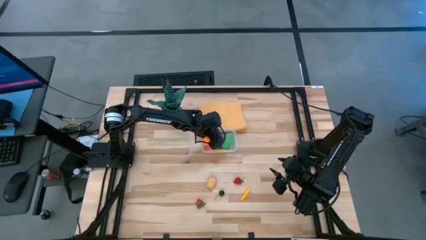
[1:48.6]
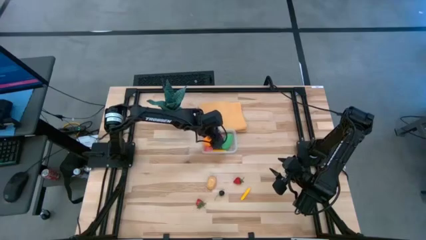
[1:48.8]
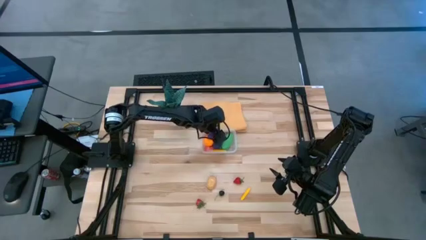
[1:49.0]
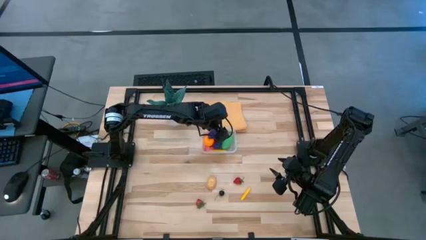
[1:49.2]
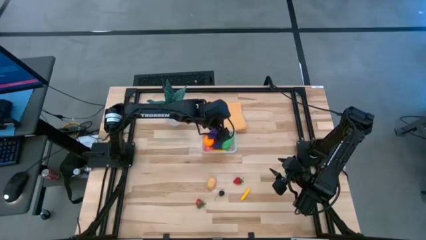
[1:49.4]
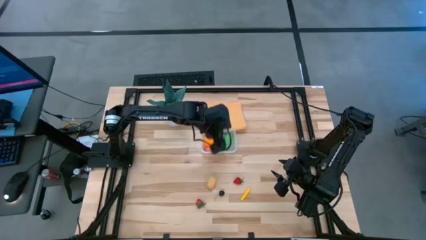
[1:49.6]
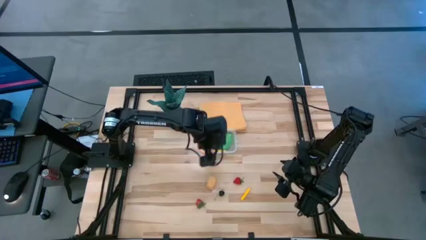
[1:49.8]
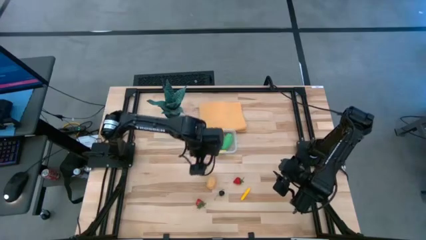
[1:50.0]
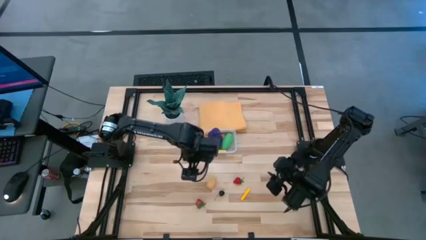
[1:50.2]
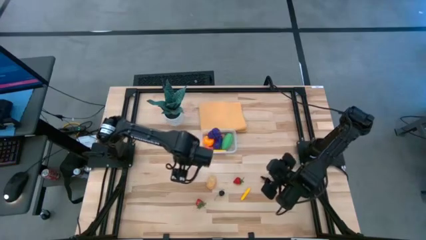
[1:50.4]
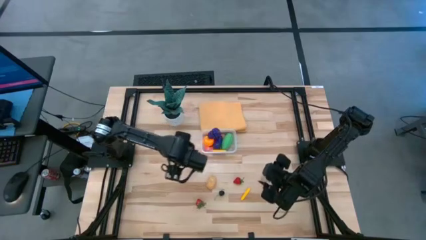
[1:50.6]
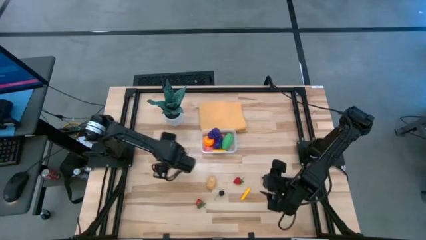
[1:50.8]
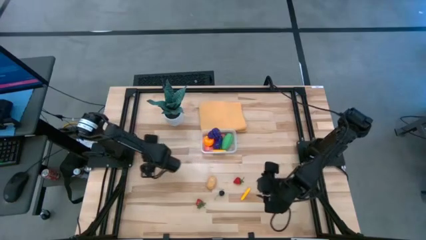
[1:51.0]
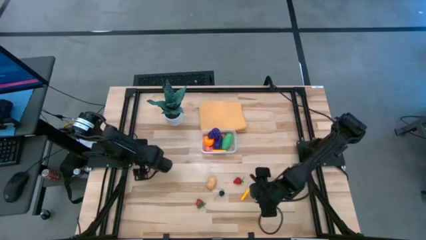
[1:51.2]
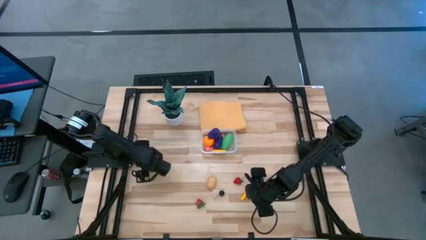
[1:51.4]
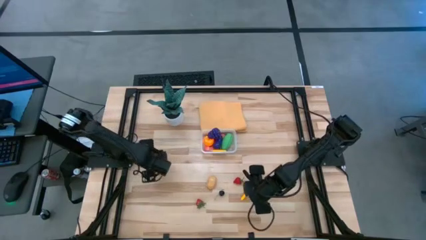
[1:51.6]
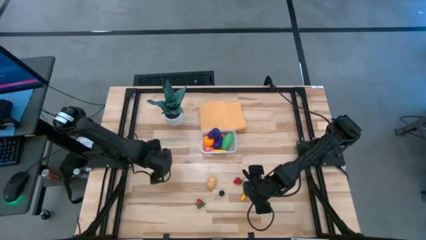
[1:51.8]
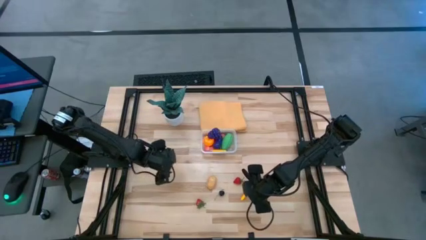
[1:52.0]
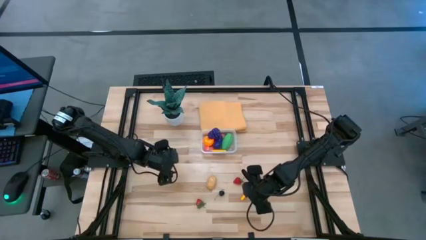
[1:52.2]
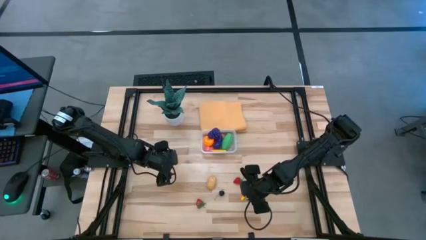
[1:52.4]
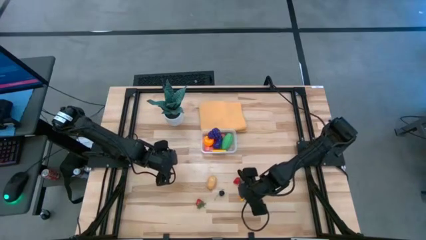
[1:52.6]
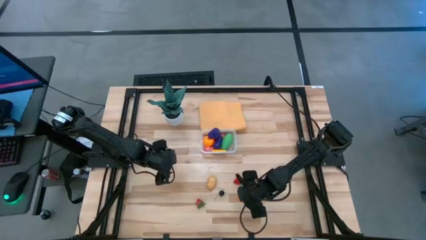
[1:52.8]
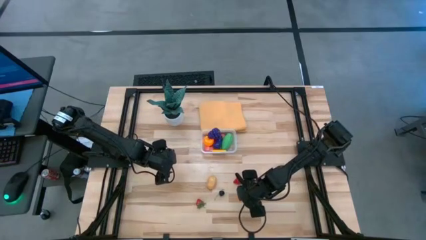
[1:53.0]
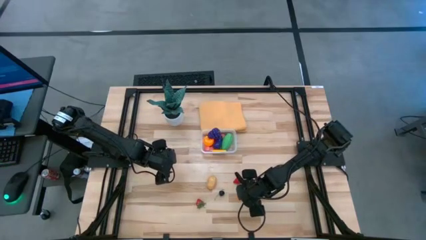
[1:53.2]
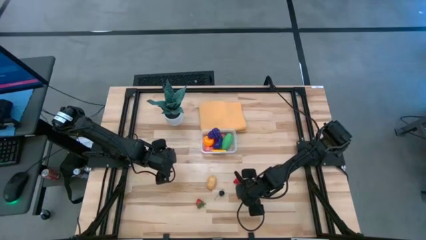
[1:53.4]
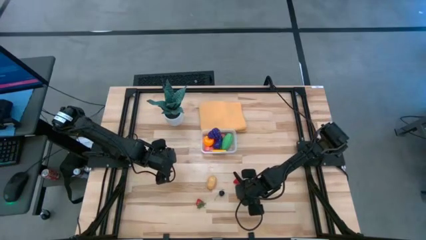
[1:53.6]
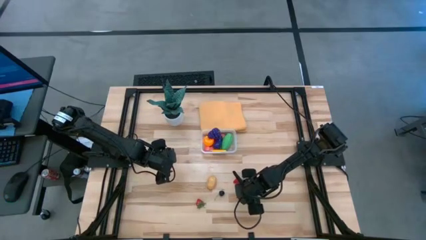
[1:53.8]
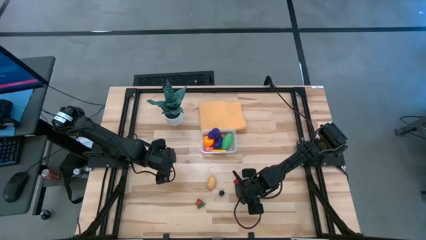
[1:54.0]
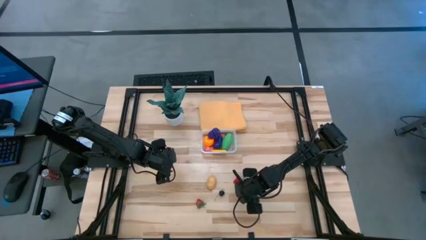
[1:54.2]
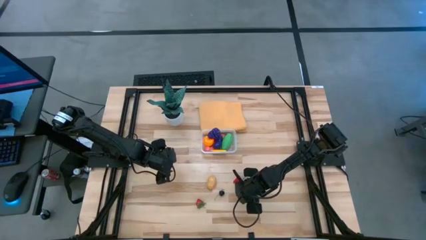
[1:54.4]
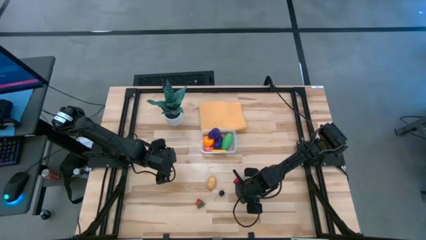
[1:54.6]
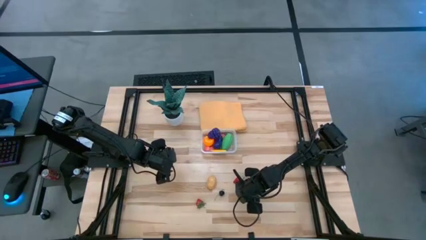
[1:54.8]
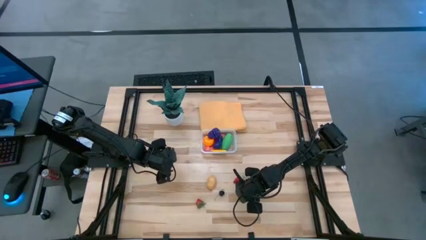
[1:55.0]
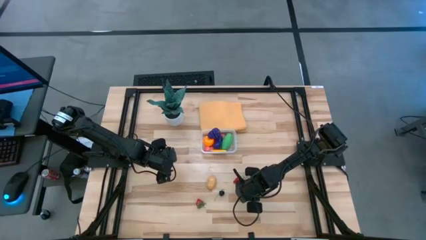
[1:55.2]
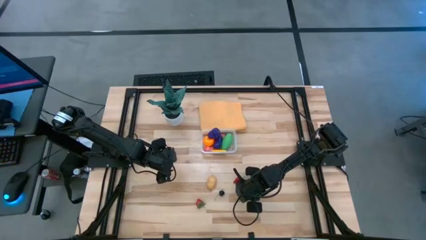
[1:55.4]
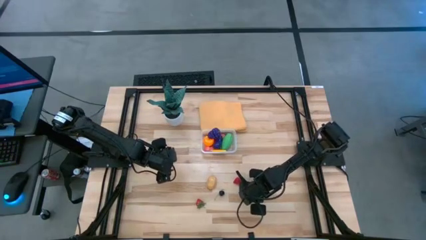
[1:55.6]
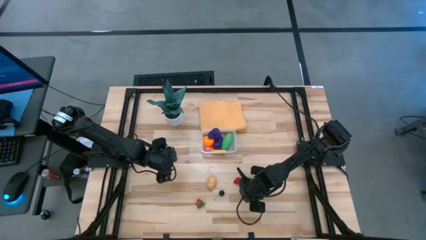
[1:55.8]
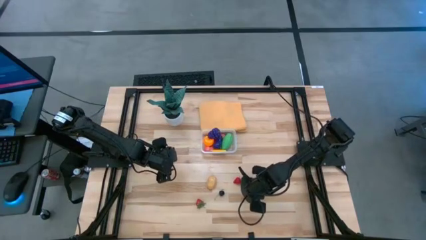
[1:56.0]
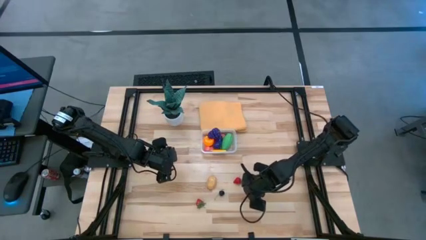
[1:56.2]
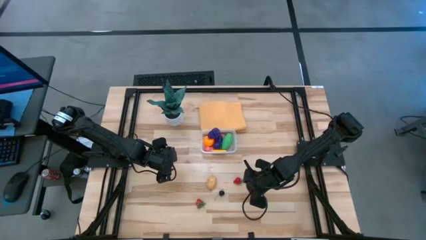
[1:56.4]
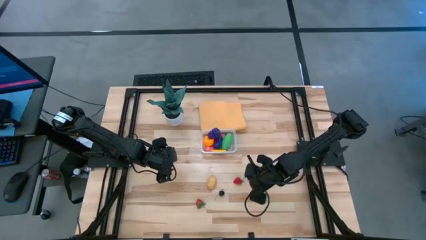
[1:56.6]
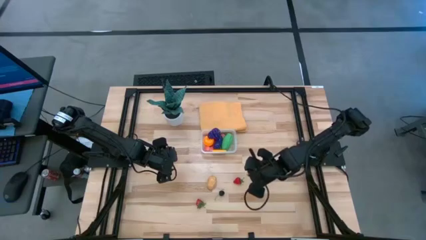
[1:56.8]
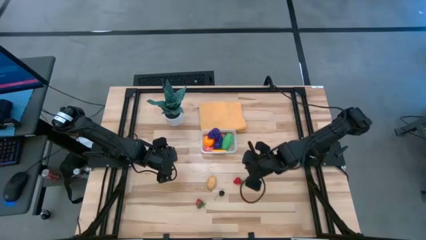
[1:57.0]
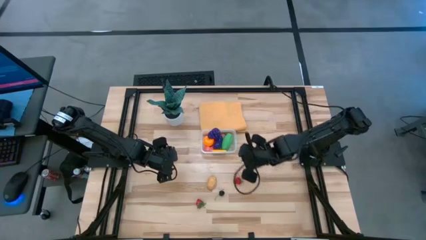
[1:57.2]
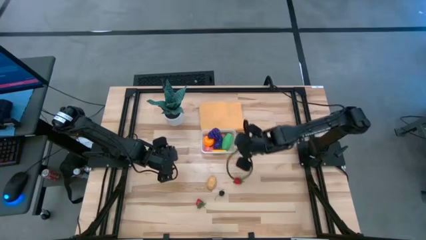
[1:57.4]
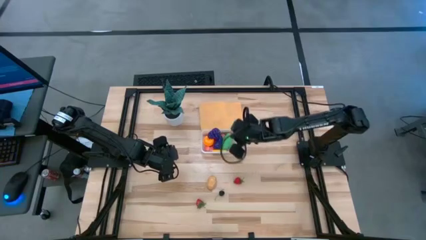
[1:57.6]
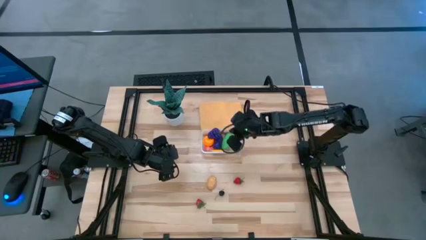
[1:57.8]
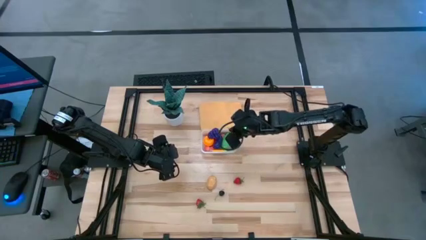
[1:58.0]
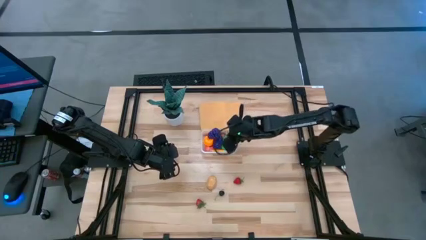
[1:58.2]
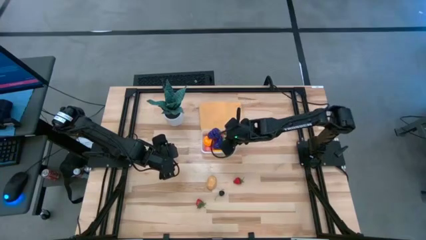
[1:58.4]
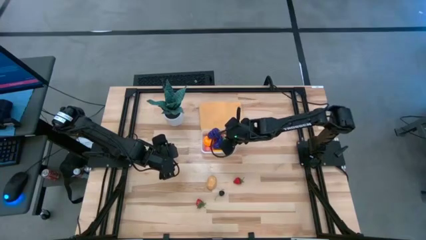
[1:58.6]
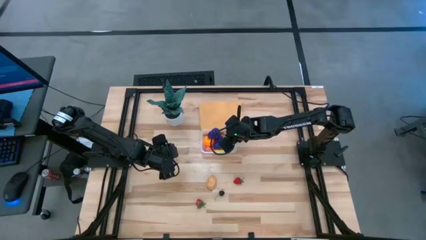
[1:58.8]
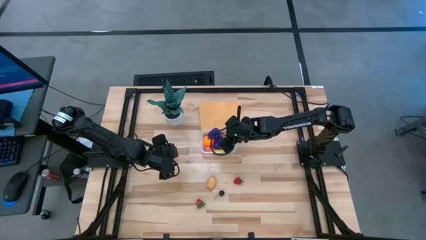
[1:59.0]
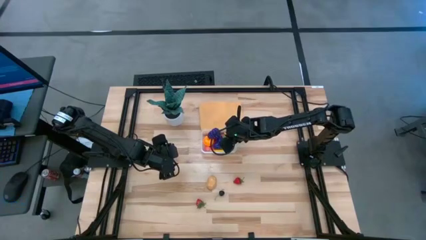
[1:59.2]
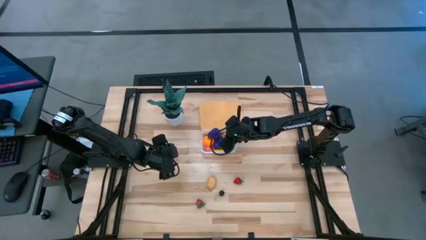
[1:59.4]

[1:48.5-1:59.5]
Task: Pick and placing Produce into tupperware
Put the yellow corn into the transparent bin

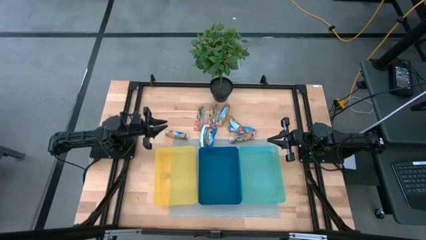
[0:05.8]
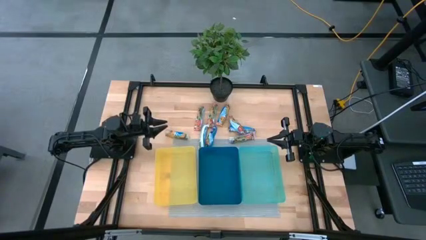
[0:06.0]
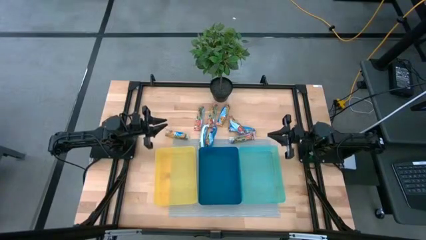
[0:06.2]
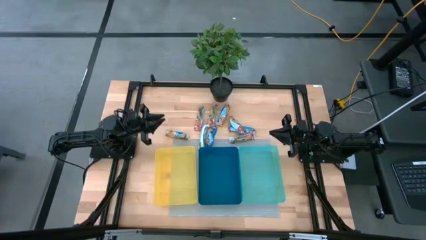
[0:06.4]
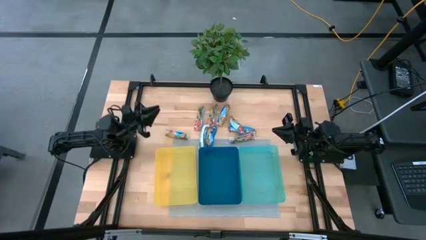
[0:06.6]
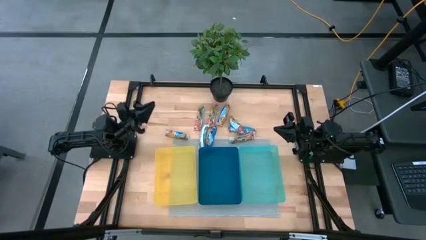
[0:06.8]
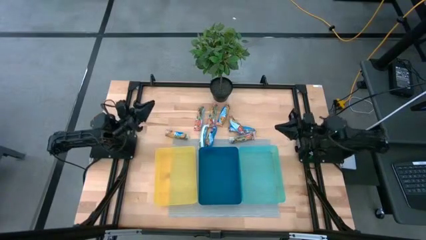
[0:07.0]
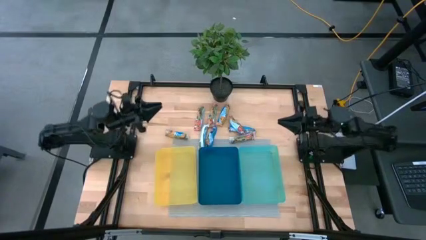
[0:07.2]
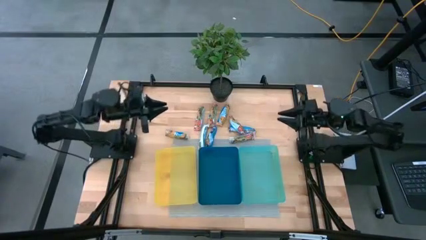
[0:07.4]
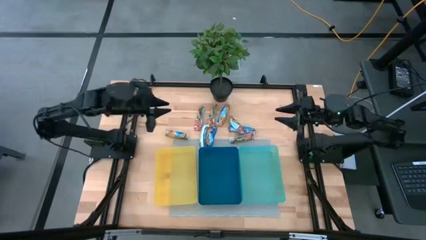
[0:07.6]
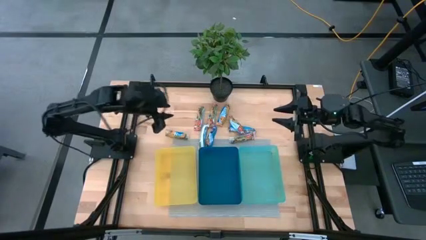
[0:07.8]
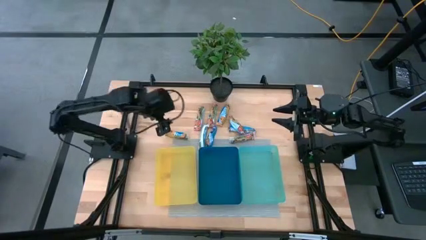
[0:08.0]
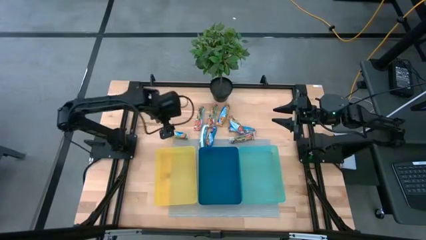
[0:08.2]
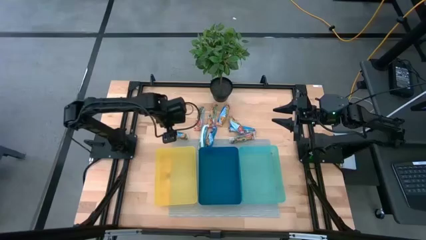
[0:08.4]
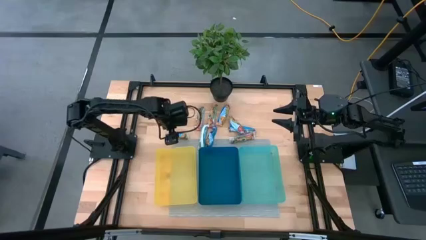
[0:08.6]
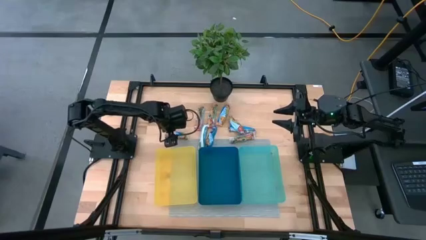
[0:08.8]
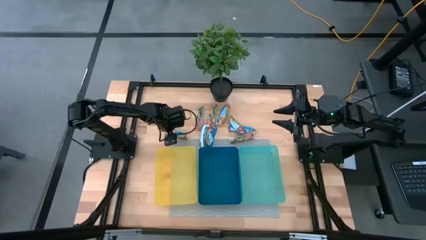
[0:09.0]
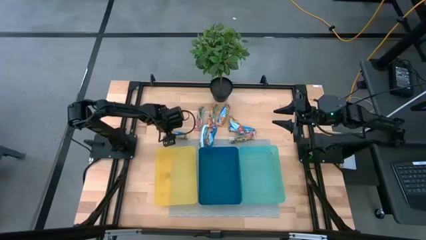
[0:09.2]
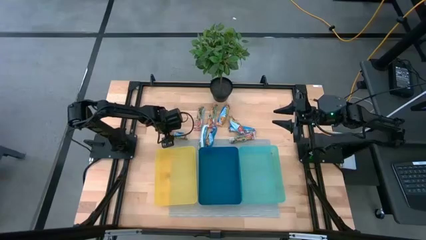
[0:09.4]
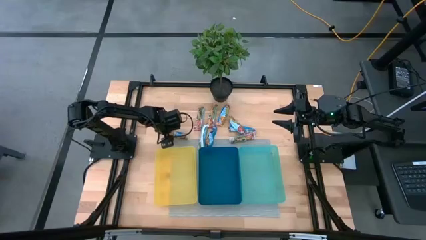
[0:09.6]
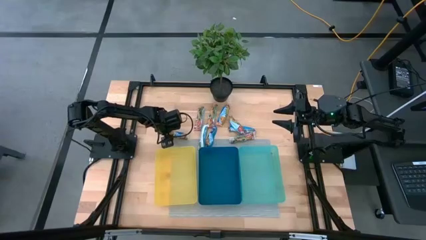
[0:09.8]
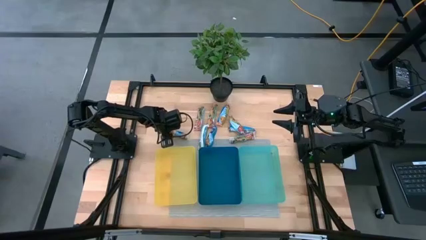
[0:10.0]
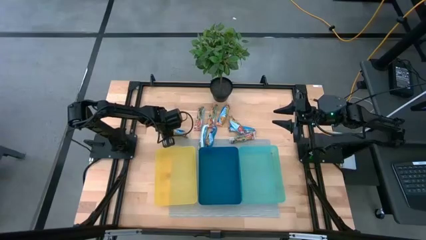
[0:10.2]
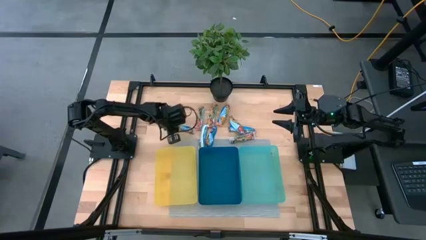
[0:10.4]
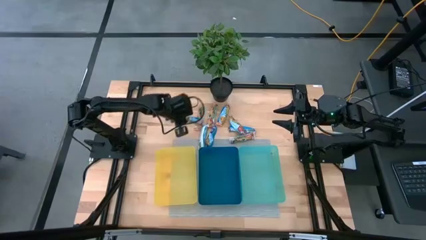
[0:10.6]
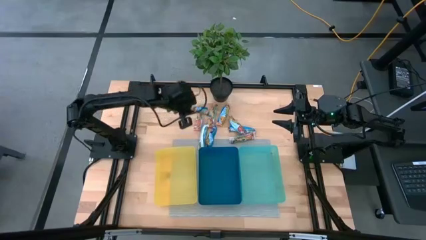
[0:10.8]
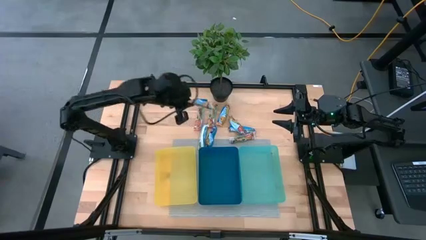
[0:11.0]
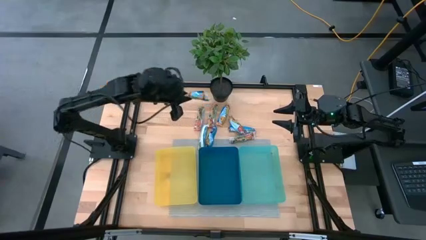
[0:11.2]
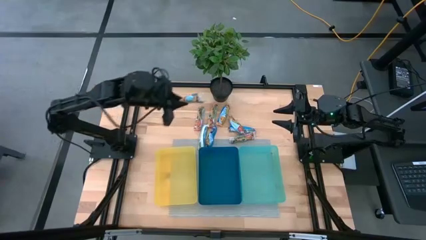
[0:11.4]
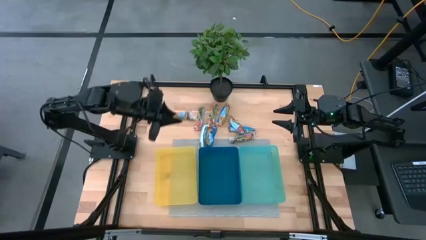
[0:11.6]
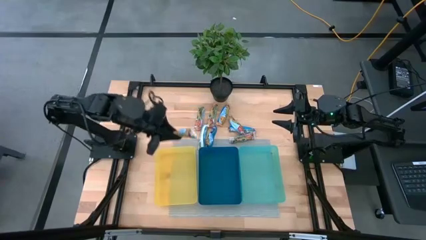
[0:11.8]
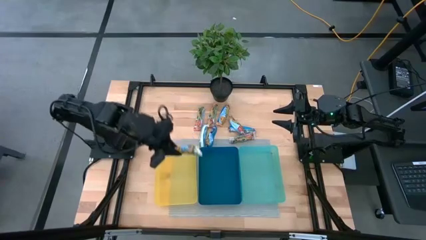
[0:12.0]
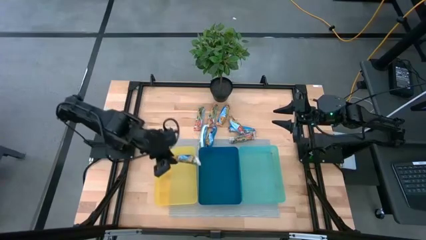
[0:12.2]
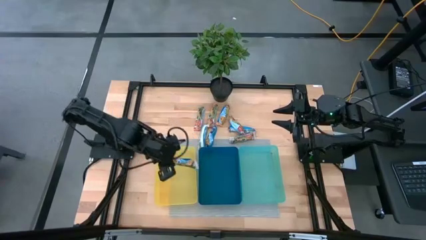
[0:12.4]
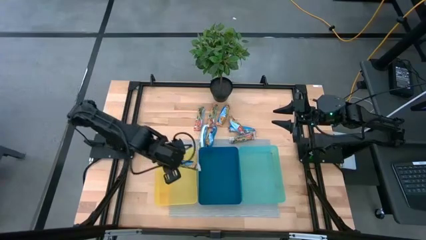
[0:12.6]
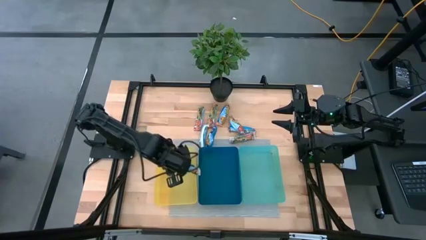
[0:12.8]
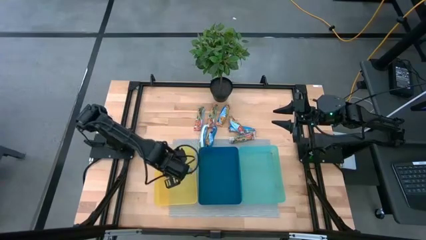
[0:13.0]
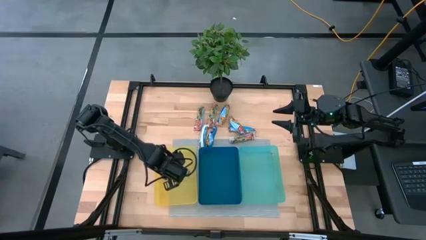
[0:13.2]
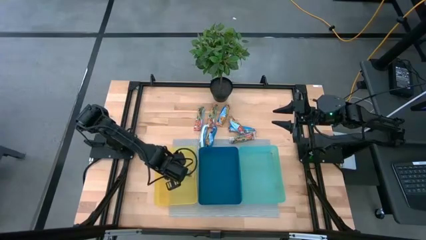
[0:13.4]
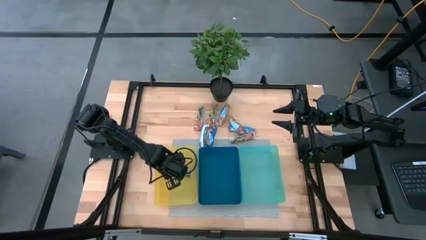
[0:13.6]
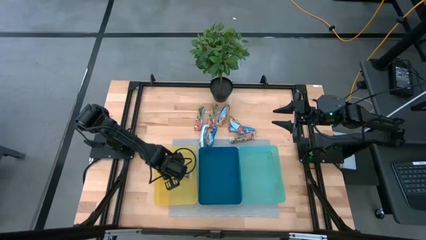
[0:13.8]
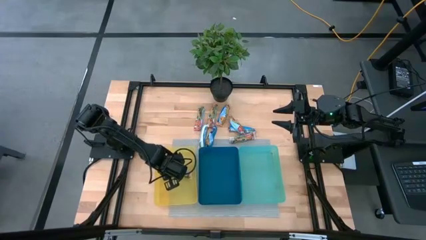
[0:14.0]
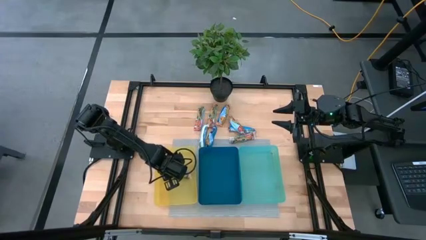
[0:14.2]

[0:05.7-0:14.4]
Task: Pick and place Granola Bars by type
Put the yellow granola bar into the yellow bin
